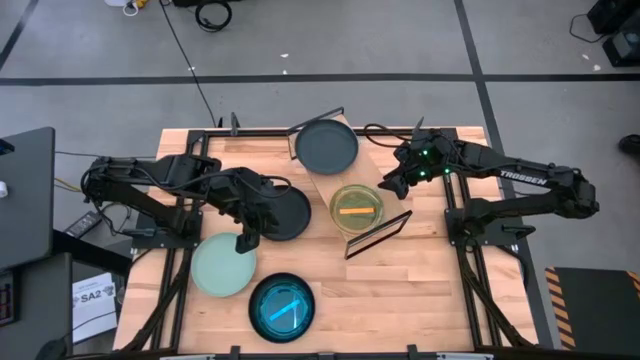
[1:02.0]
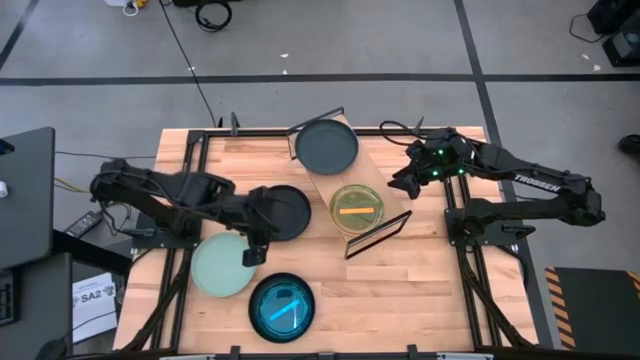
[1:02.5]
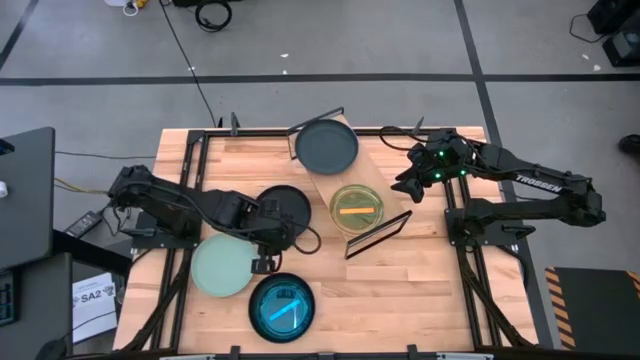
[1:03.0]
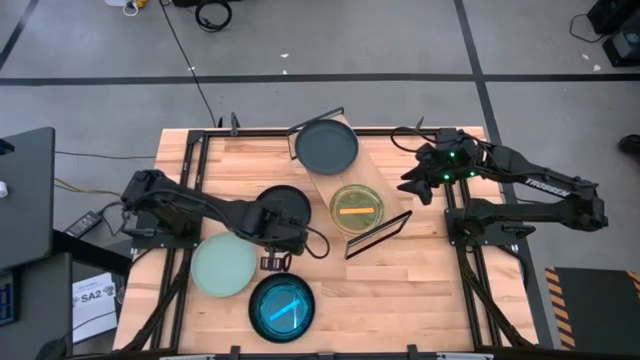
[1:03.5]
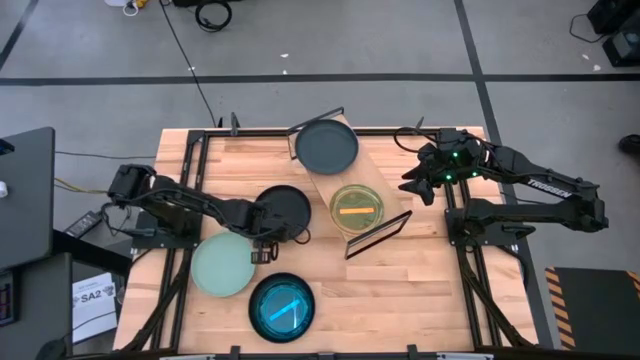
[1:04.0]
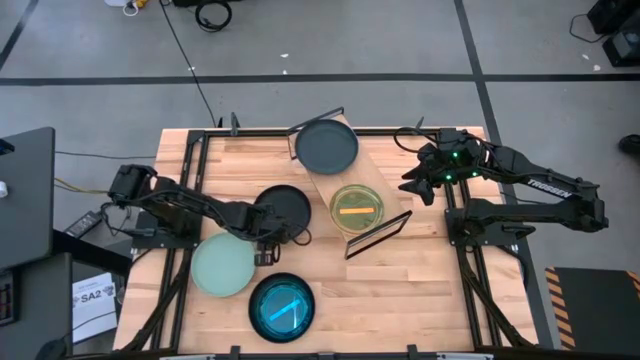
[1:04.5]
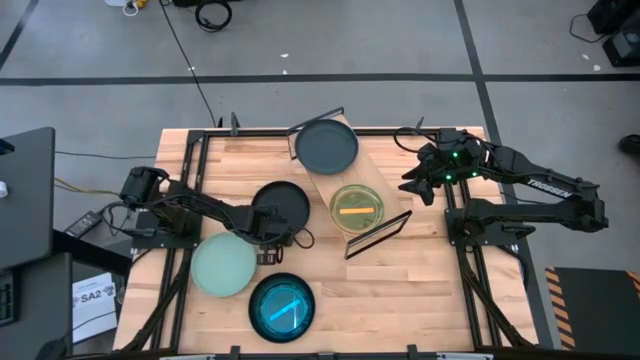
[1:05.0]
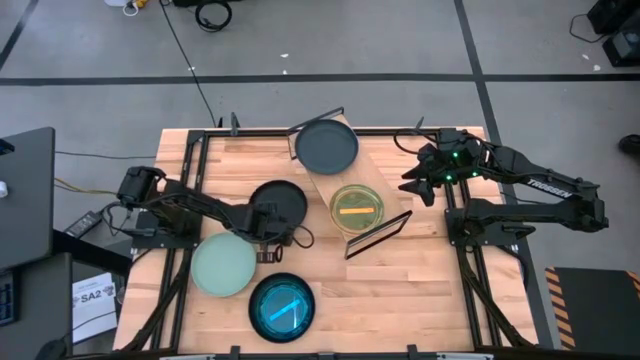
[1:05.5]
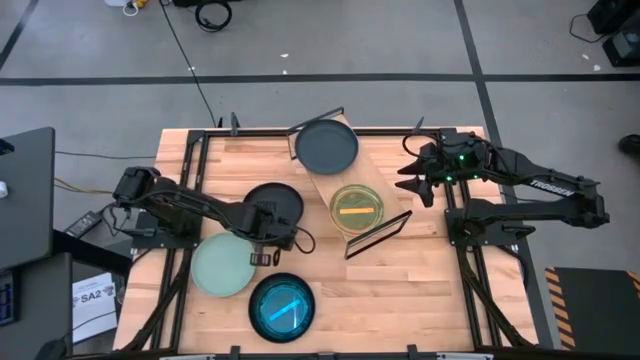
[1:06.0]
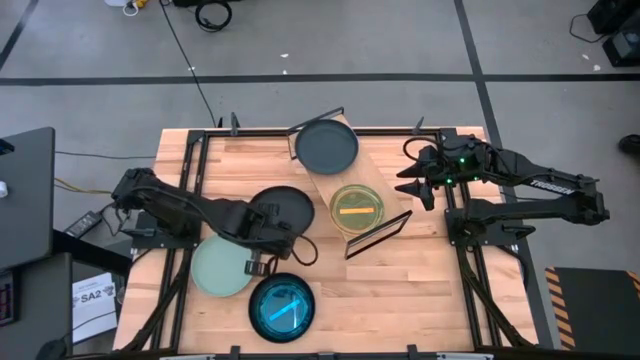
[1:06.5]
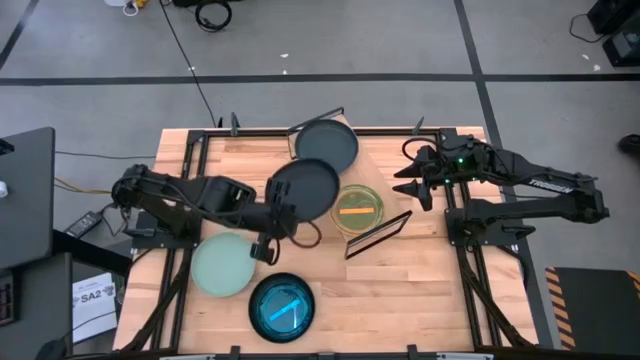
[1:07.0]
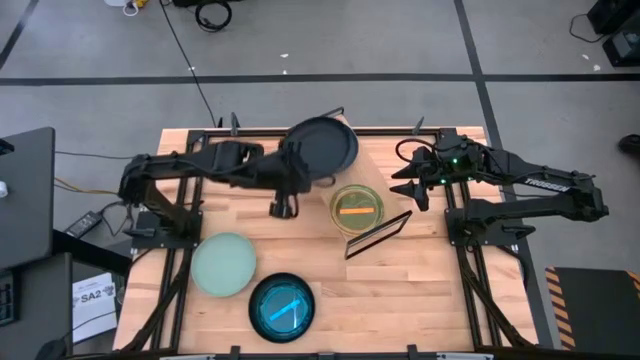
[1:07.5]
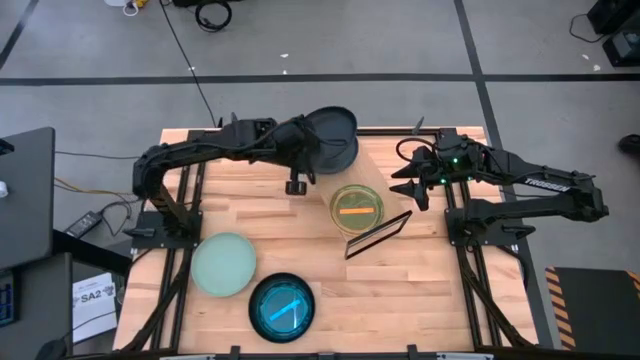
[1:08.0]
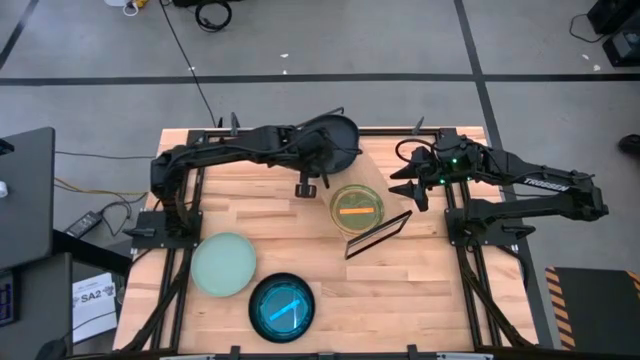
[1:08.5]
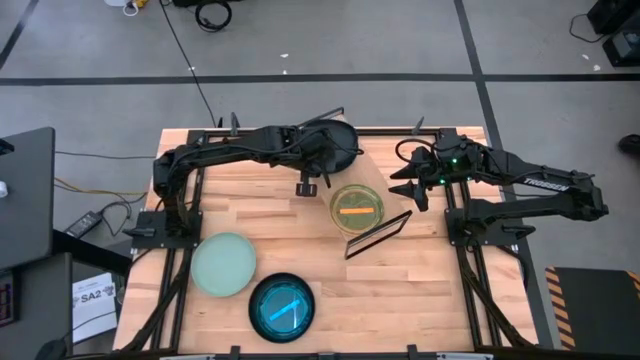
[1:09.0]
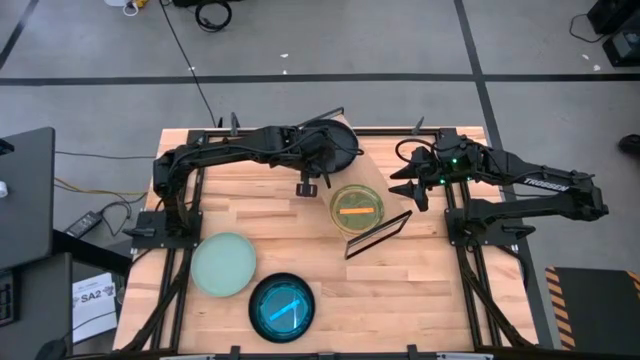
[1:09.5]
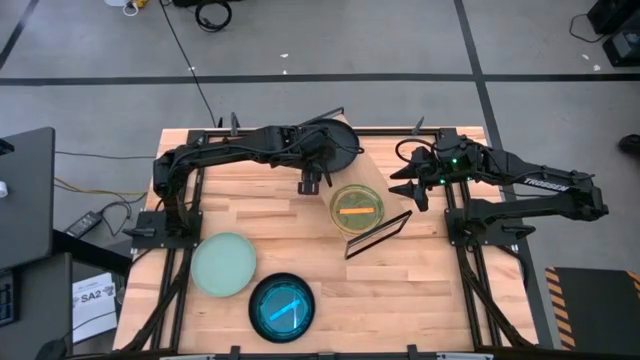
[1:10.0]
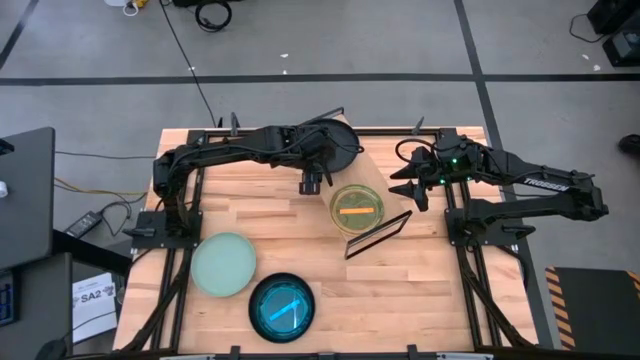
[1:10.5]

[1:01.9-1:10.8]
Task: Place and stack plates onto a shelf
Stack the top black plate on the top of the black plate on the shelf

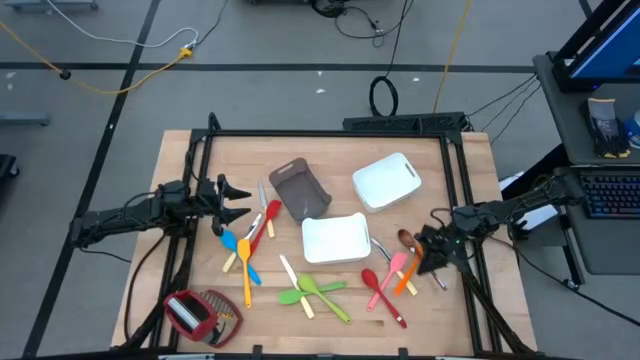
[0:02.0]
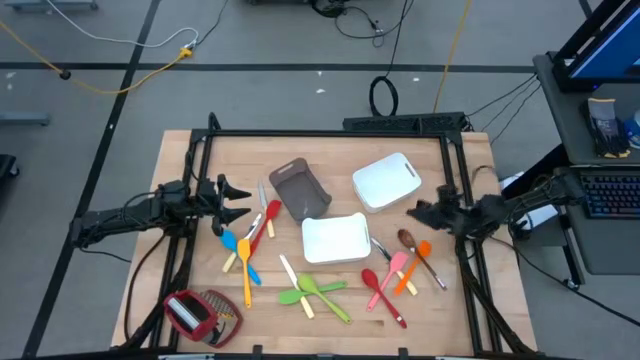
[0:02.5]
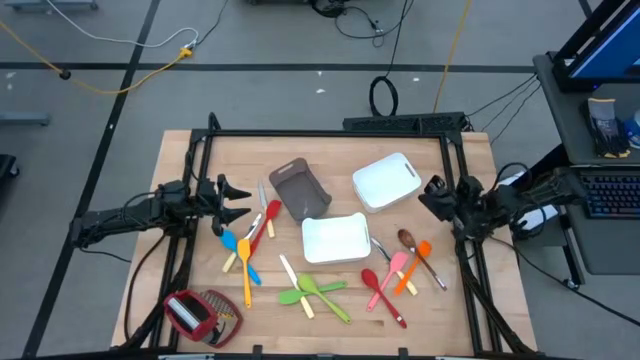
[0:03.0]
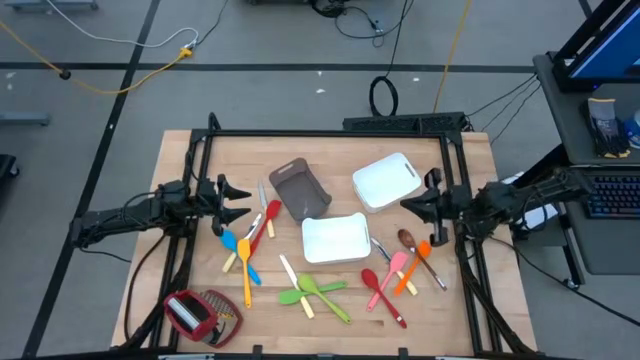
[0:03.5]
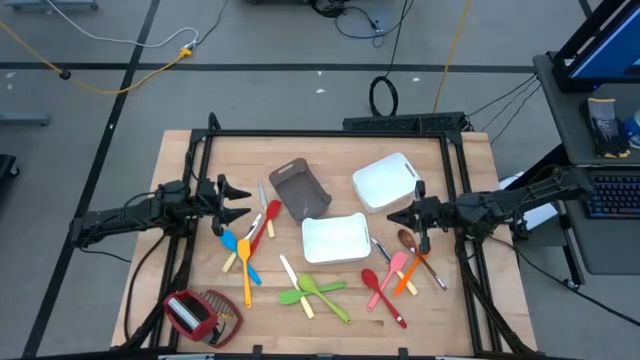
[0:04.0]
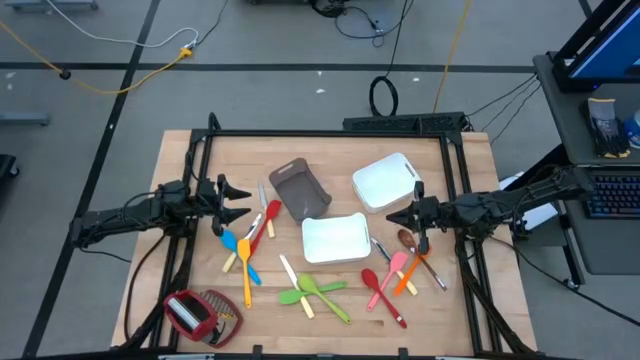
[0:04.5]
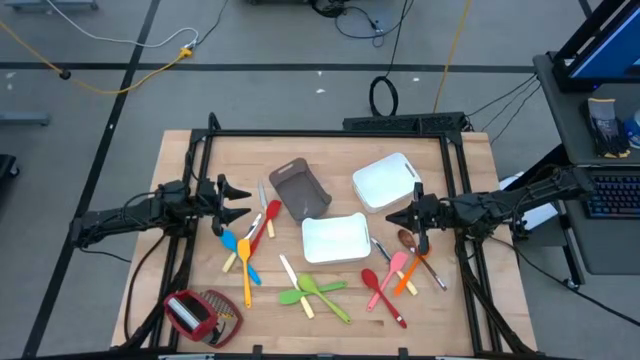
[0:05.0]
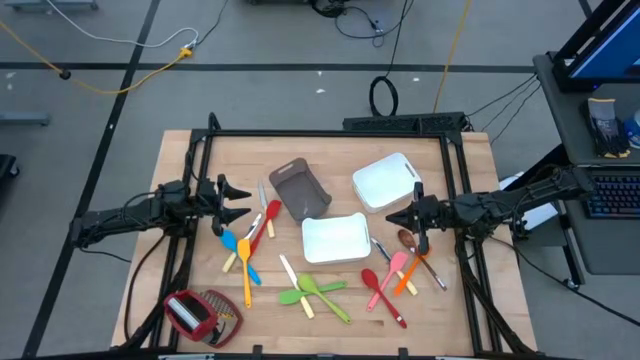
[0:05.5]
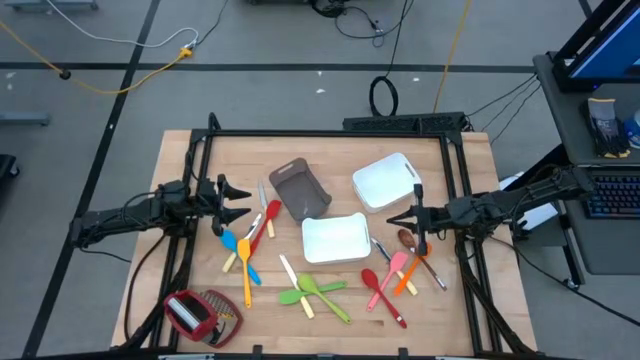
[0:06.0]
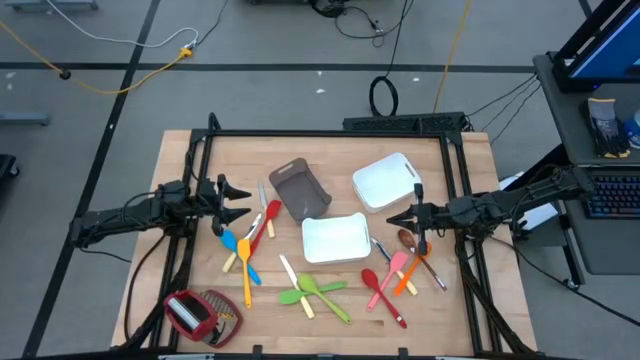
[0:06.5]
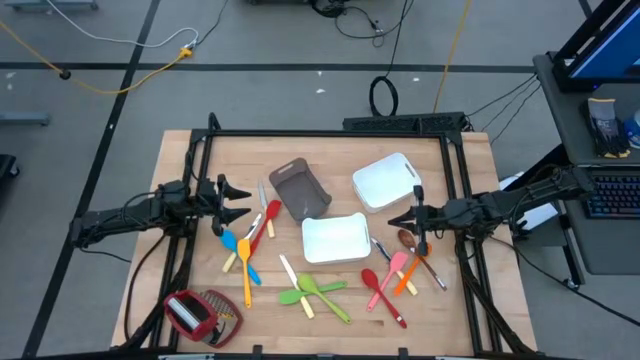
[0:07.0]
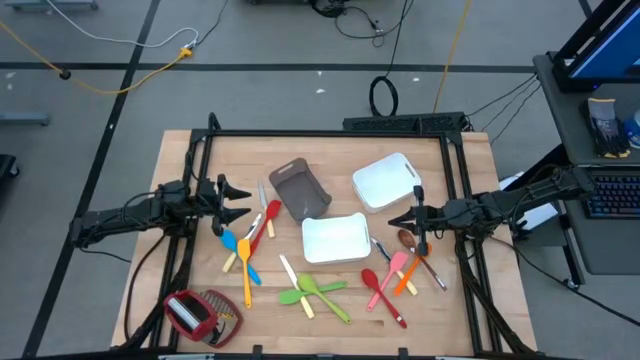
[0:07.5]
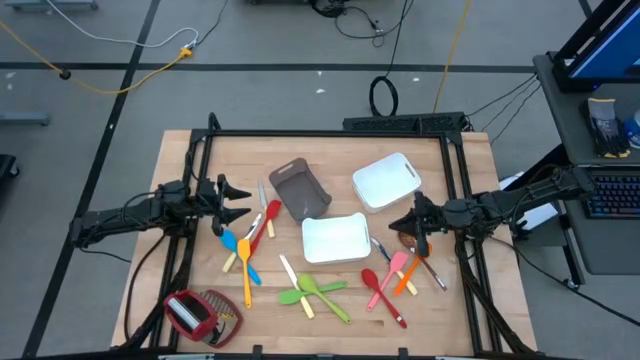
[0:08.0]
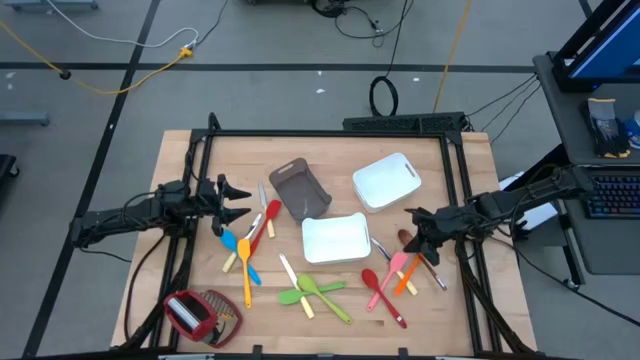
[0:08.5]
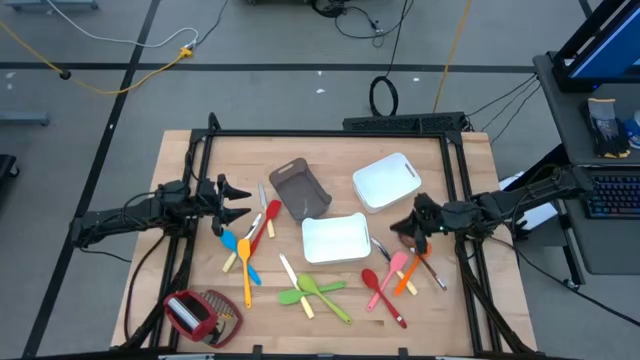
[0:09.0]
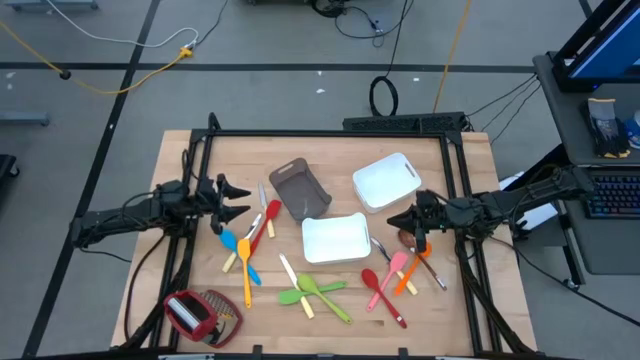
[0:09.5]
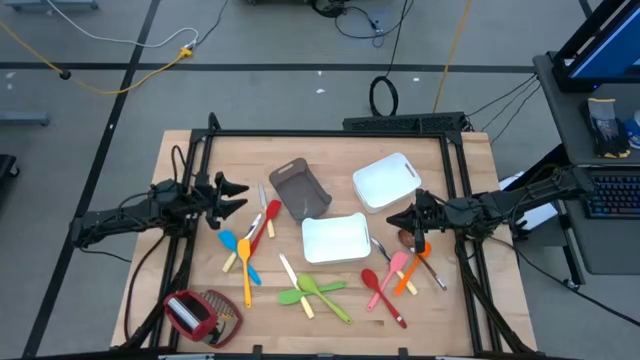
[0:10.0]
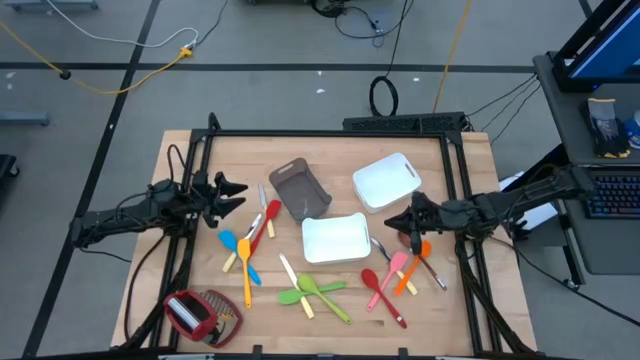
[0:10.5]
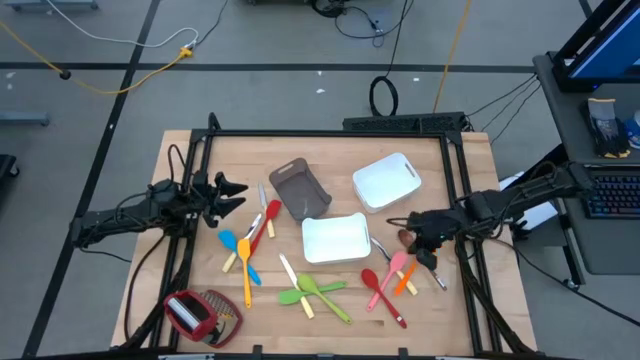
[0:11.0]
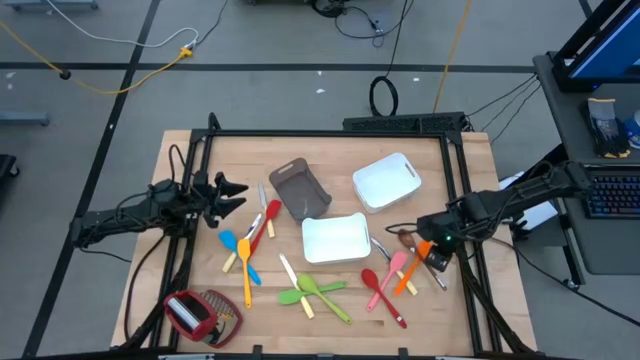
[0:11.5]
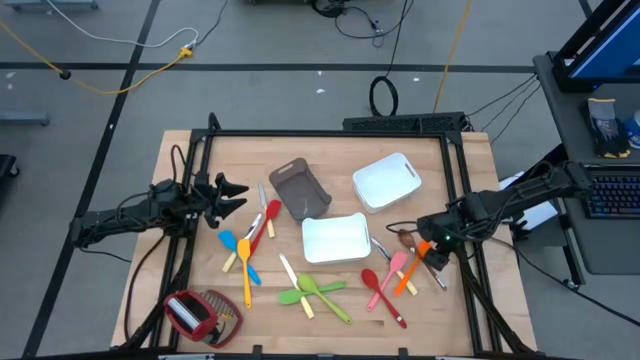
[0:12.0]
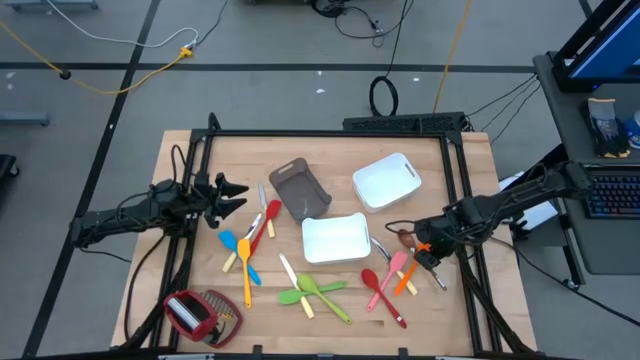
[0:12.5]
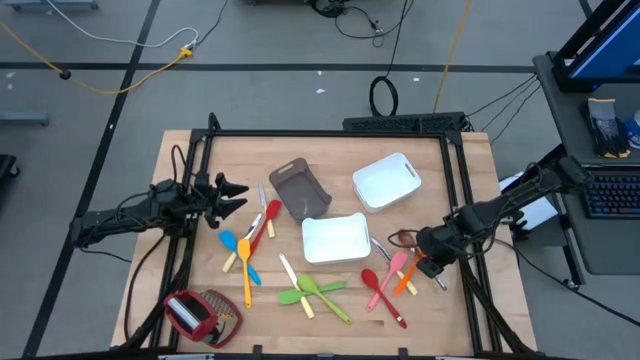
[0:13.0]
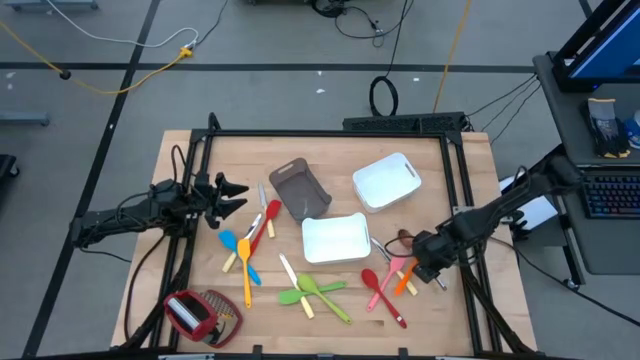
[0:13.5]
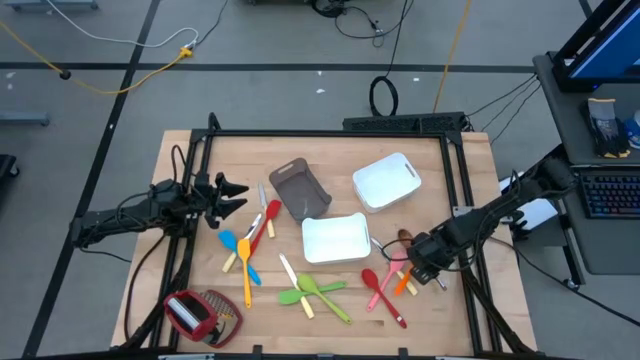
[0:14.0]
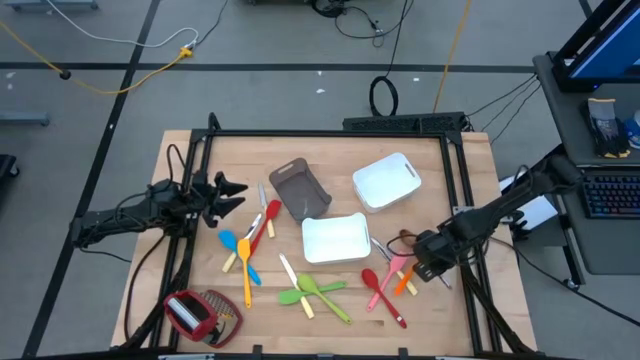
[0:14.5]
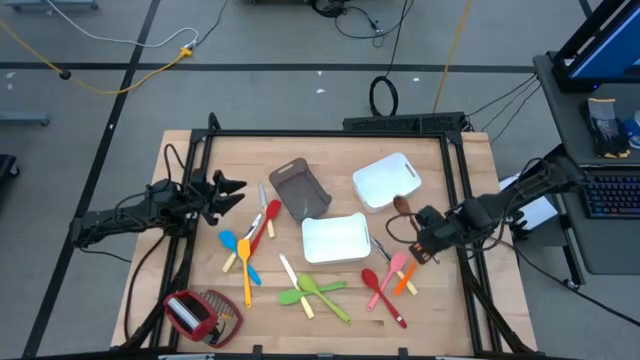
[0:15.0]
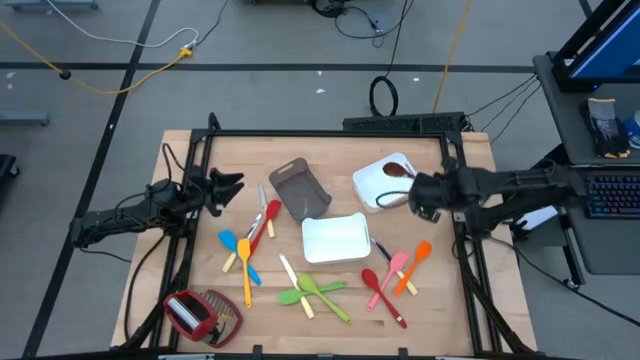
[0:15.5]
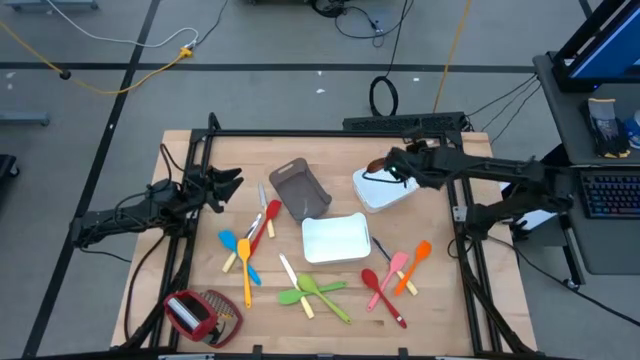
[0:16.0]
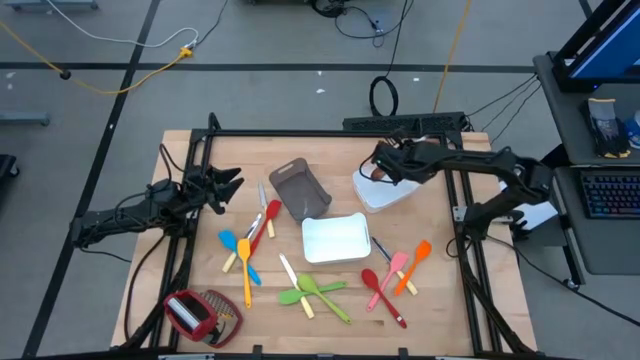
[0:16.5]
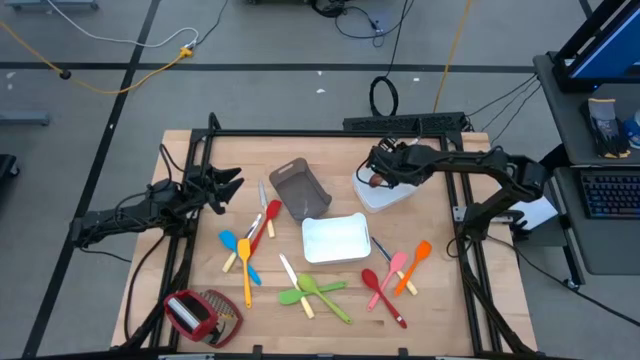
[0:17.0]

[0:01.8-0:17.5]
Task: Pick & Place Kitchen Items
Put the brown serving spoon into top white bin
